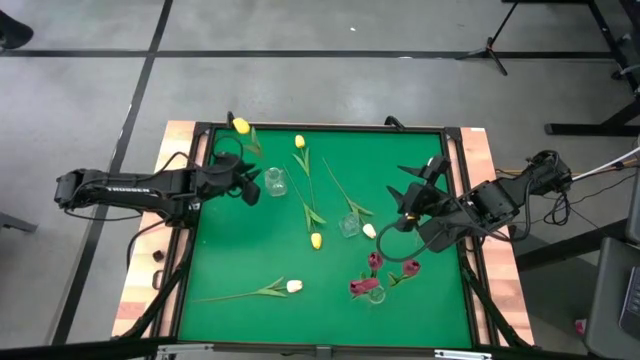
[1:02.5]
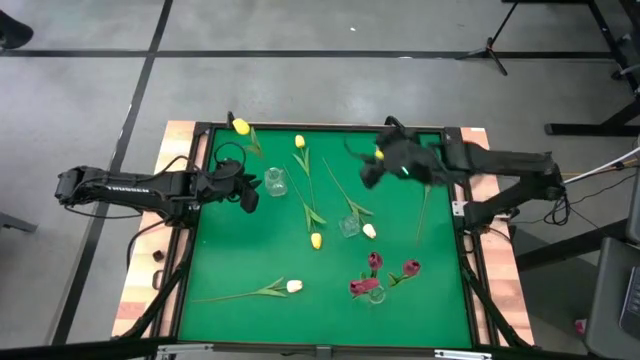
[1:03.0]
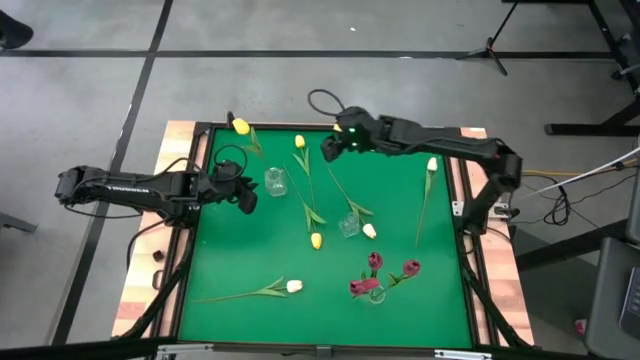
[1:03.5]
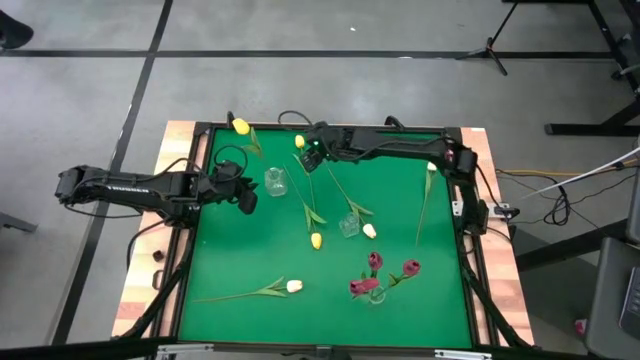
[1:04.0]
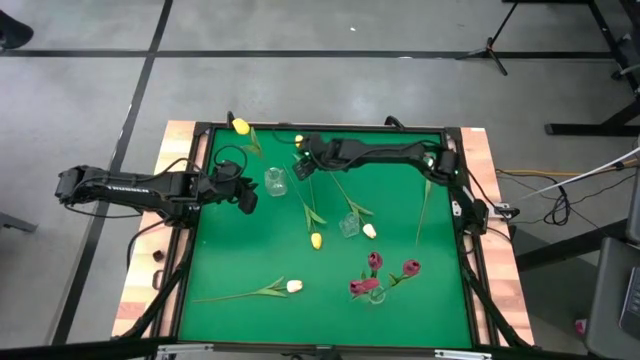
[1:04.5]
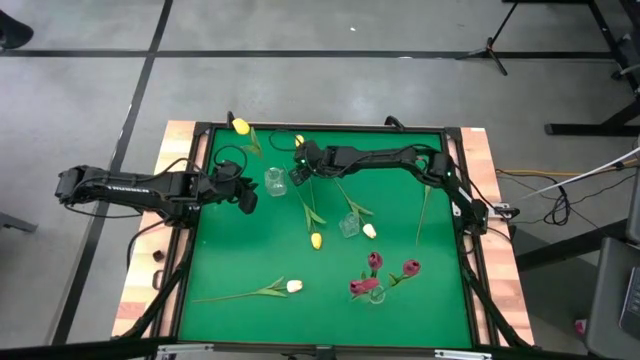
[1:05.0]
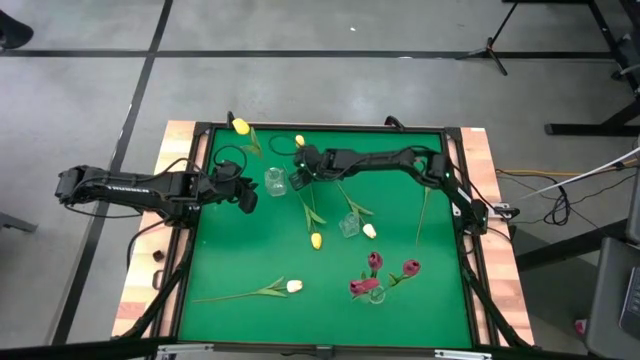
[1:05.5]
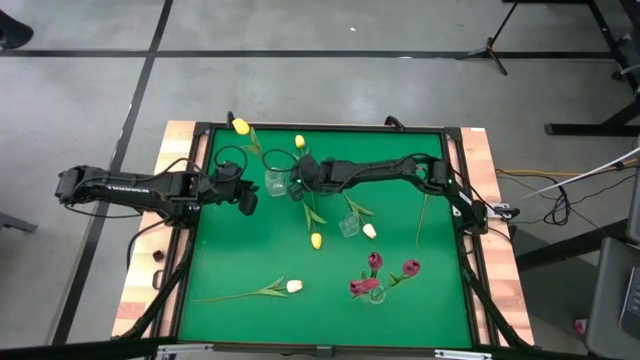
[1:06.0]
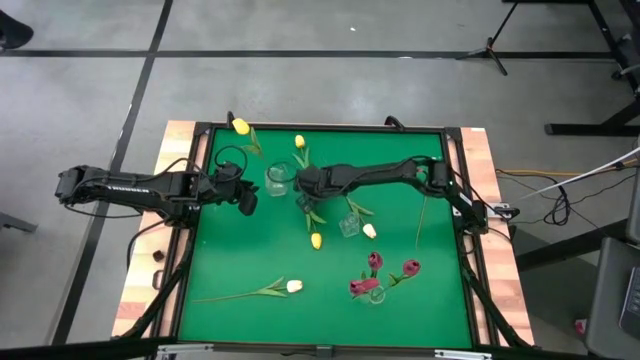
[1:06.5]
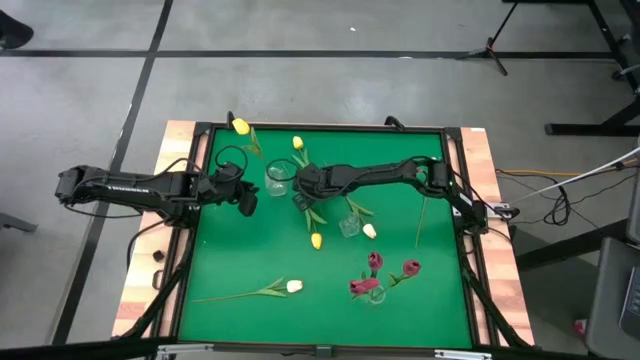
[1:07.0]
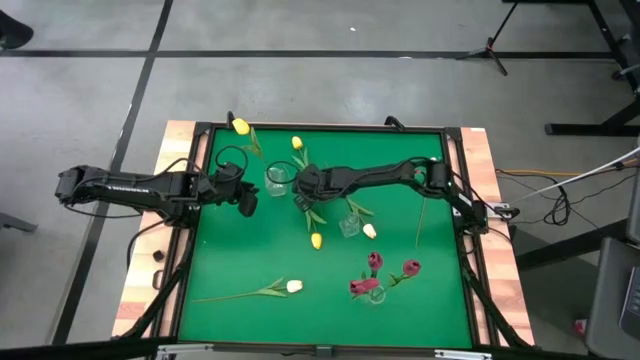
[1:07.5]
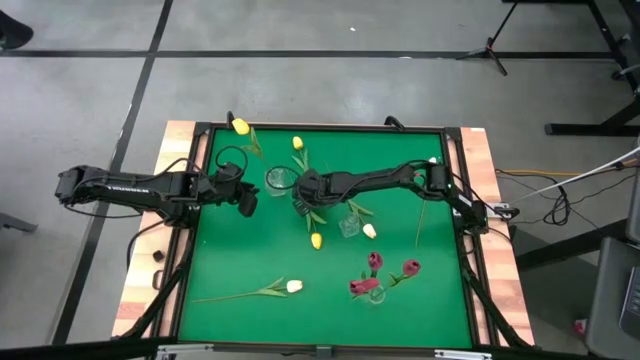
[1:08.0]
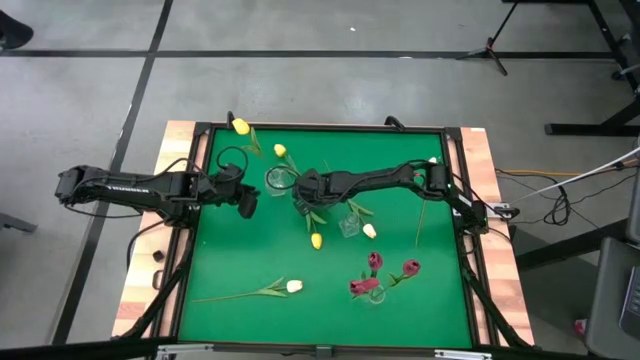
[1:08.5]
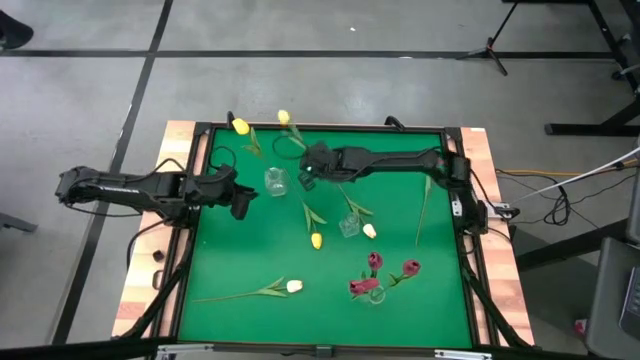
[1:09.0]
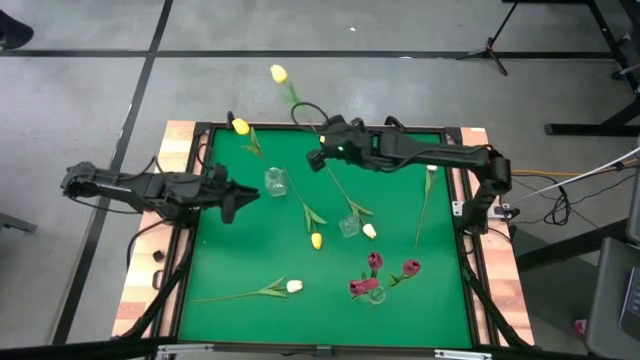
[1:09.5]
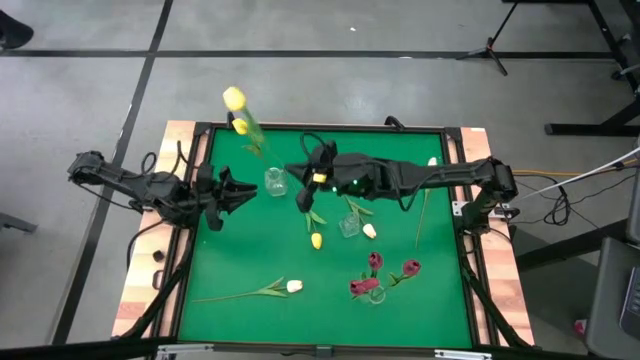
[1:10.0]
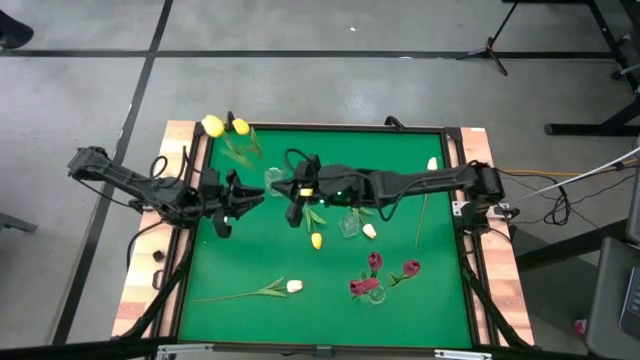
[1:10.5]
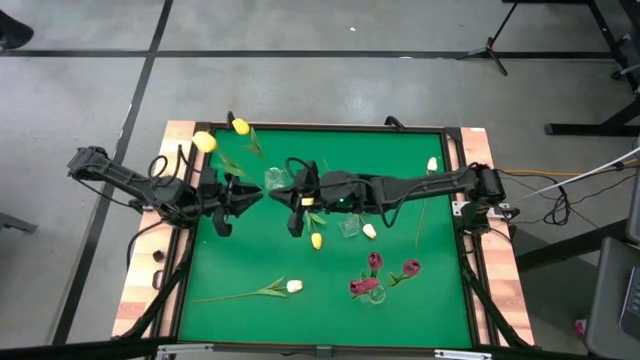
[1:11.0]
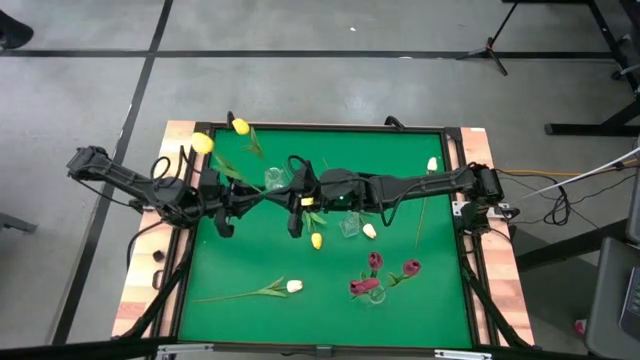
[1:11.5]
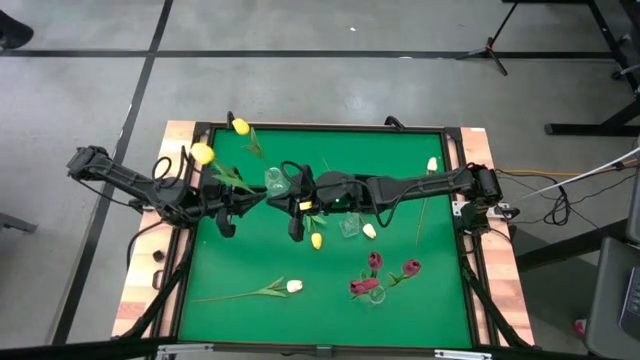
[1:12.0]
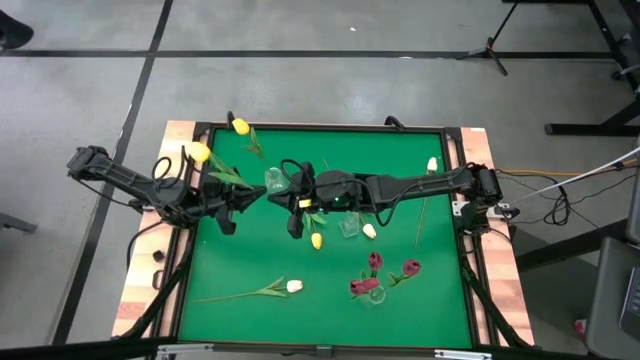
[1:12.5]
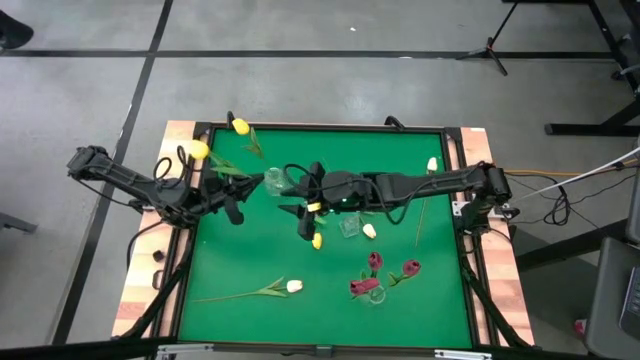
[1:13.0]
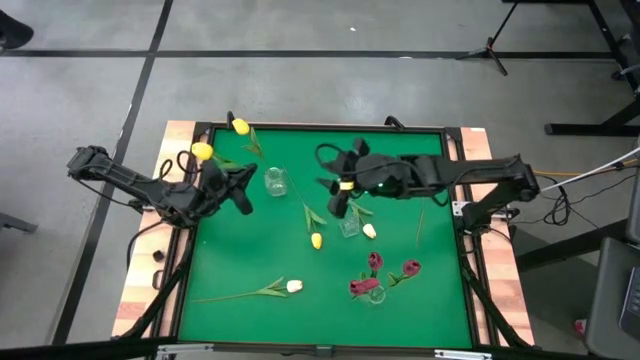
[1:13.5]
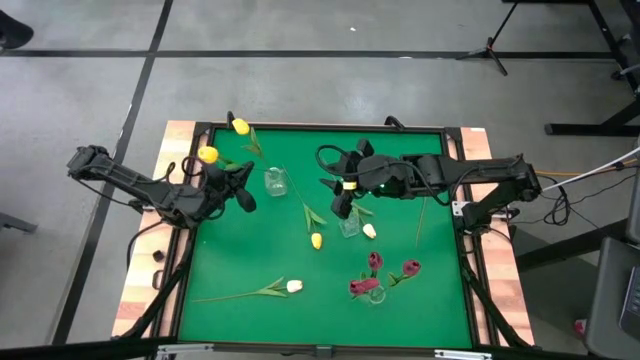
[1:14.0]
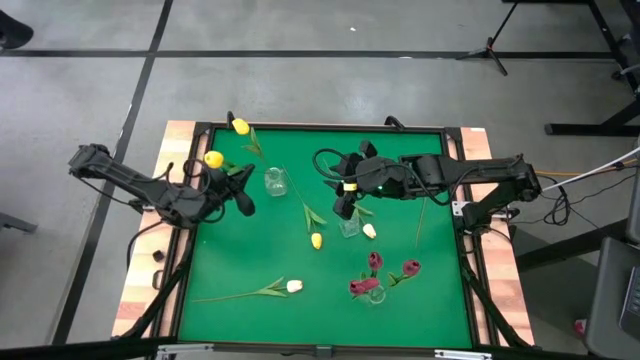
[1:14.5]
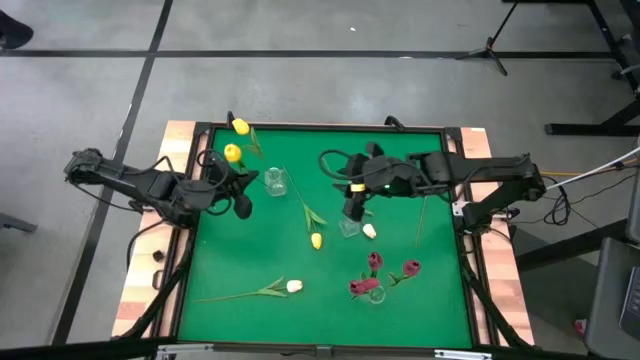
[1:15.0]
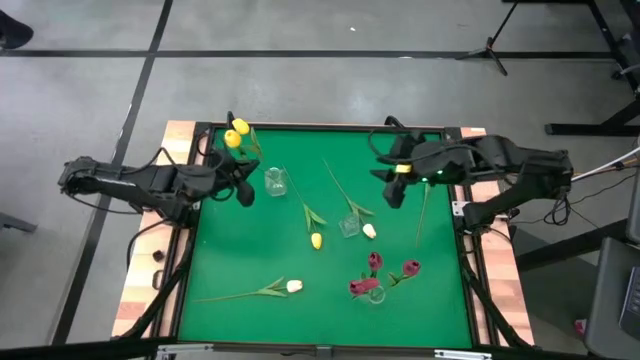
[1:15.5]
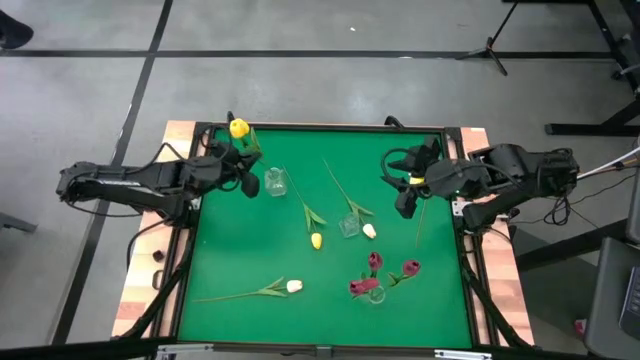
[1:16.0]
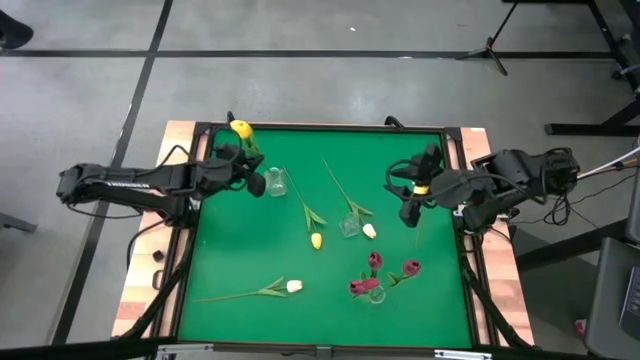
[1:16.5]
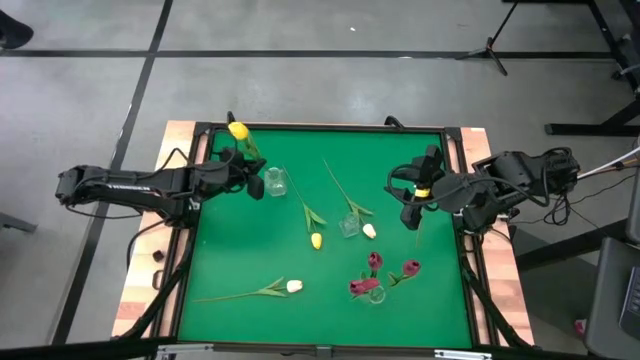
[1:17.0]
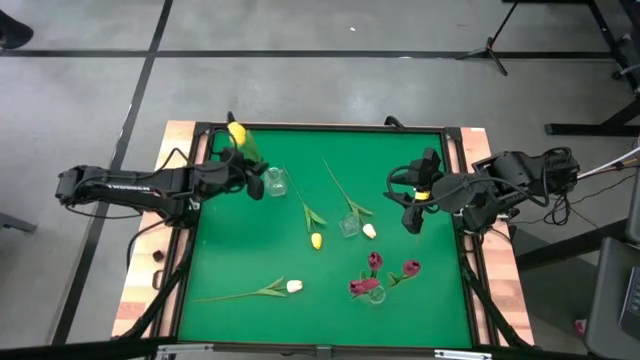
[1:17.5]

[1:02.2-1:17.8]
Task: Sort flowers into vase by color
Put the top yellow tulip into the top left transparent vase

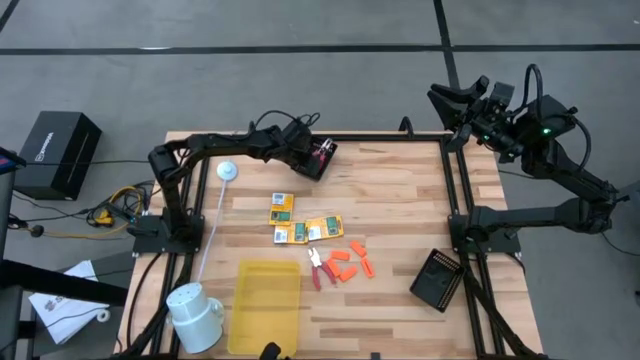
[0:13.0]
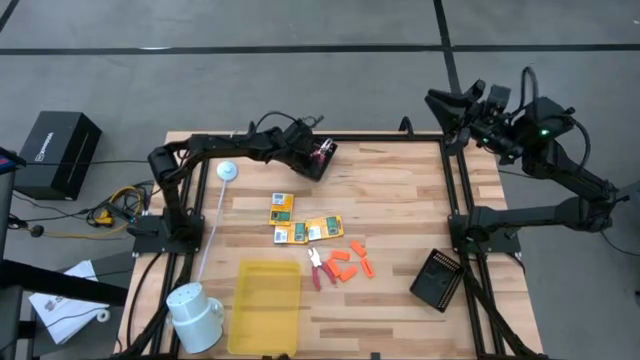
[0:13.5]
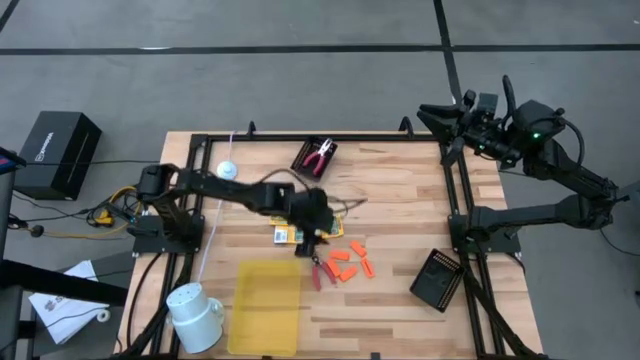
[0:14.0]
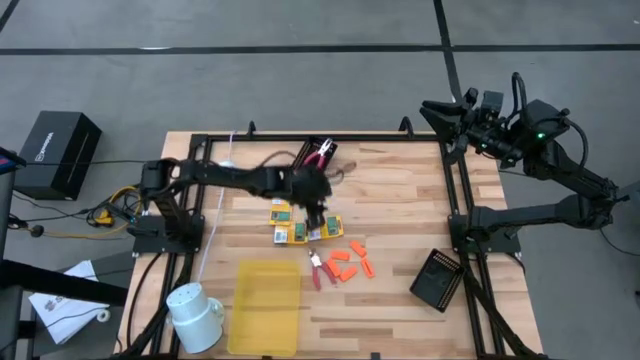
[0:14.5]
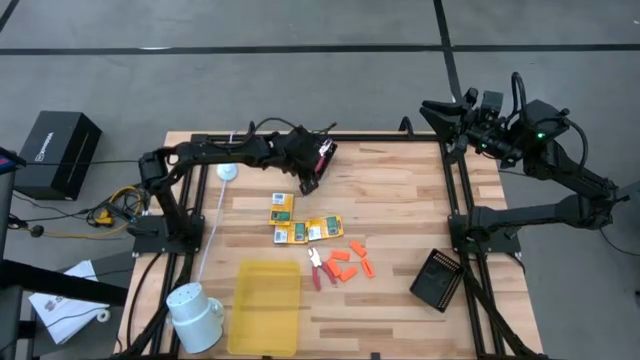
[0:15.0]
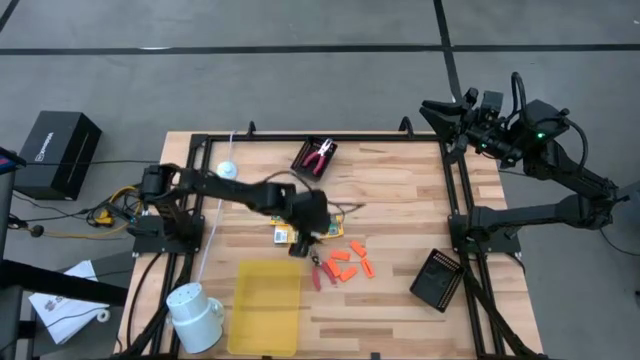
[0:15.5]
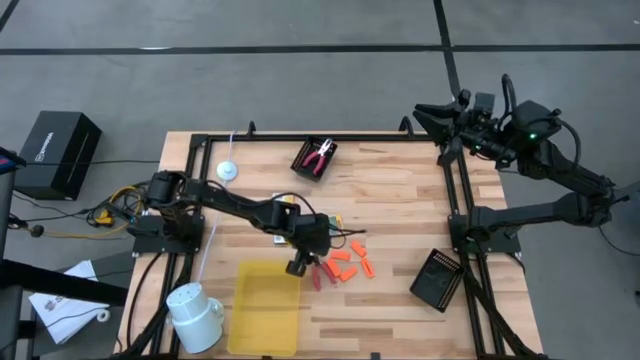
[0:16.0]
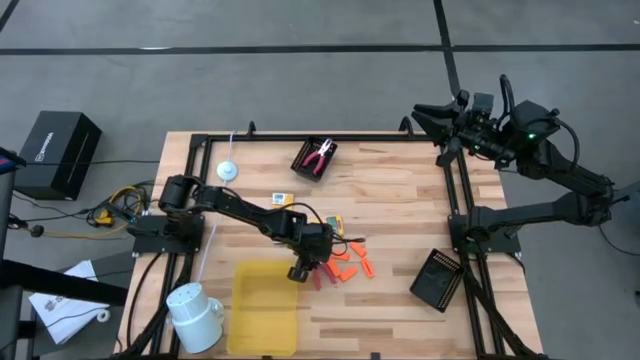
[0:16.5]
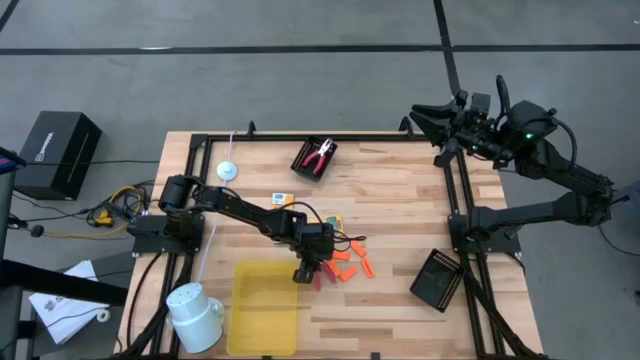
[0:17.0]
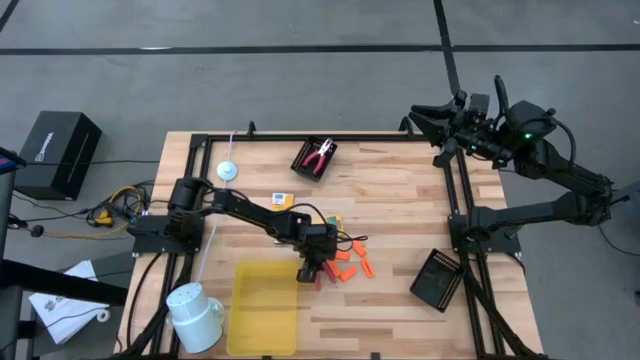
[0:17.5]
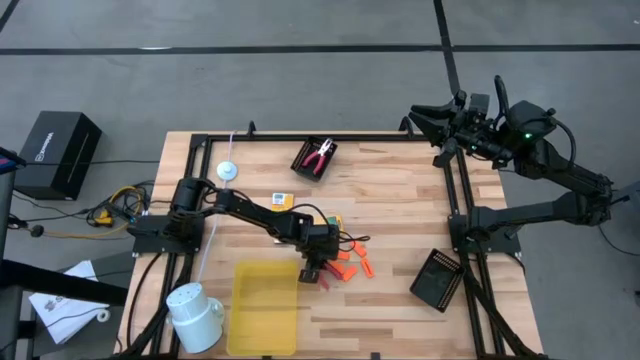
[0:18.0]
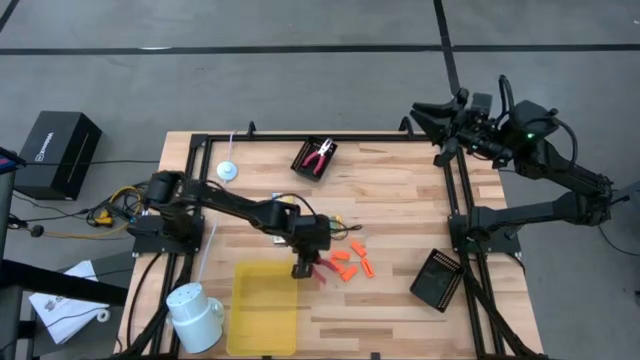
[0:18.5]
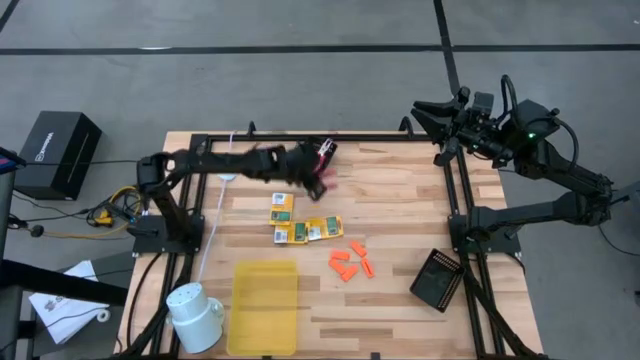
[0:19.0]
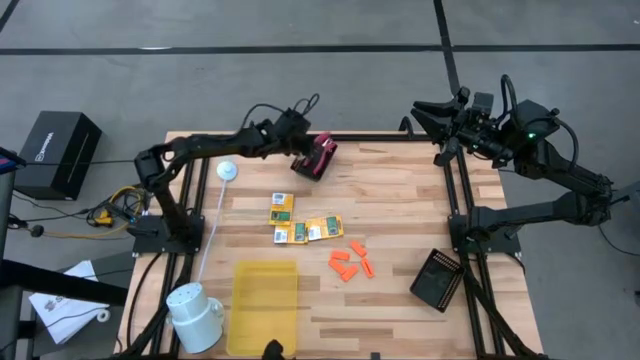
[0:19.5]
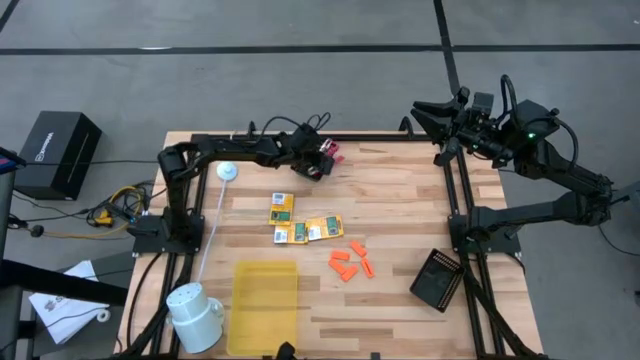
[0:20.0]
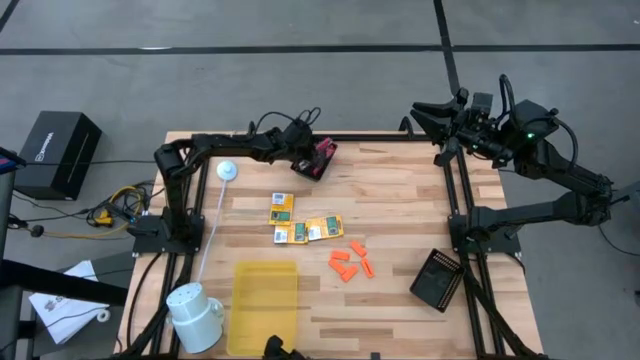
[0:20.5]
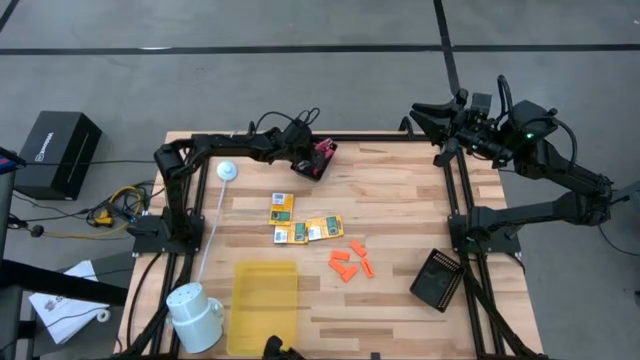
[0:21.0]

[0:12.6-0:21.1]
Task: Pick & Place School Supplies
Put the red puncher into the top black bin
